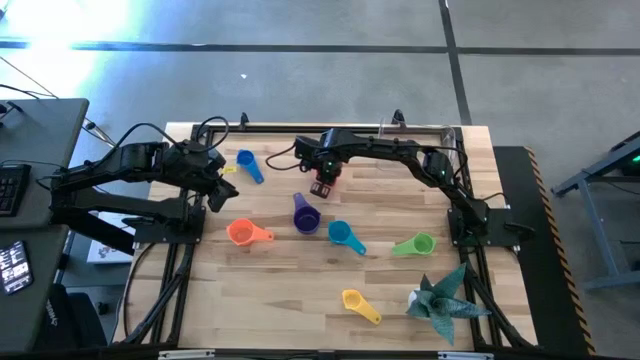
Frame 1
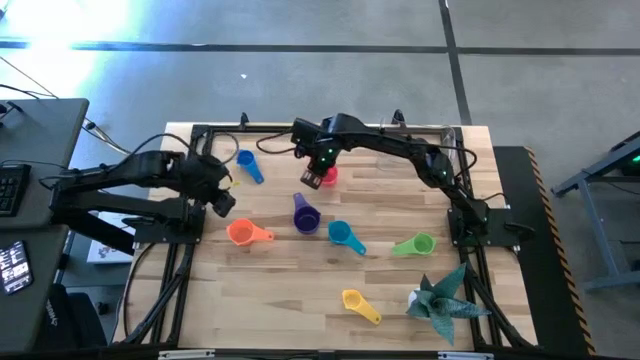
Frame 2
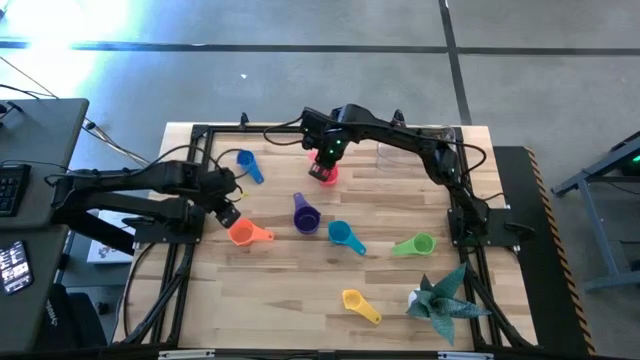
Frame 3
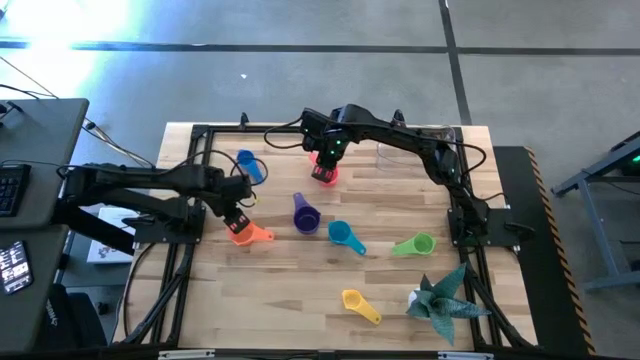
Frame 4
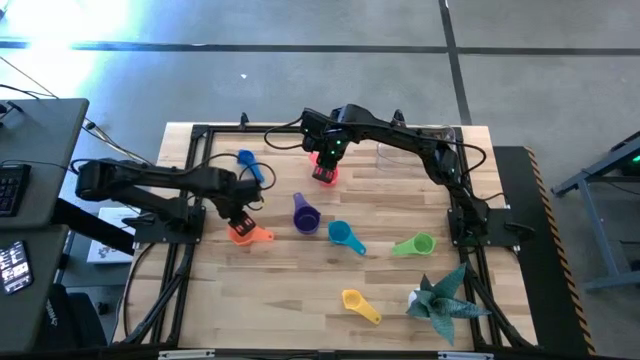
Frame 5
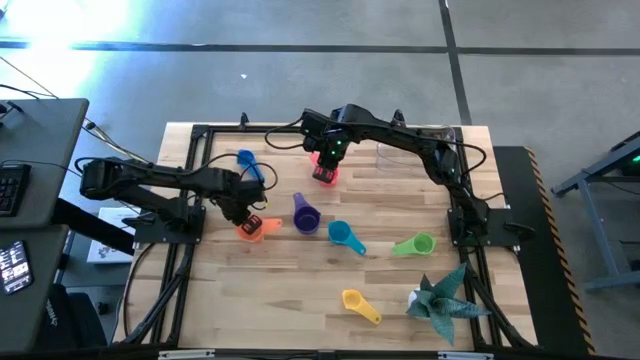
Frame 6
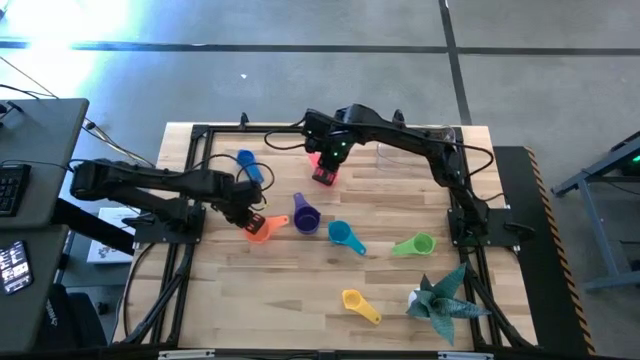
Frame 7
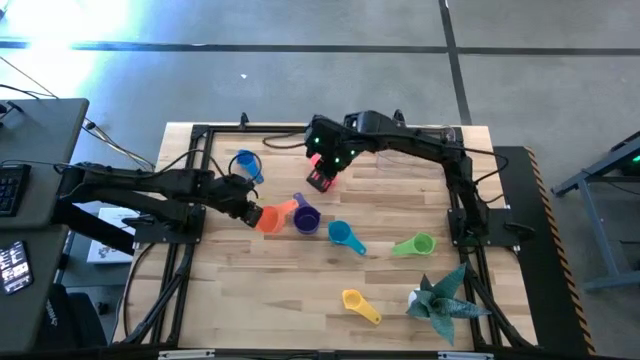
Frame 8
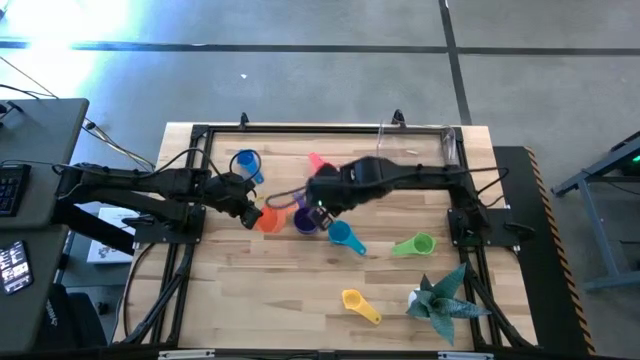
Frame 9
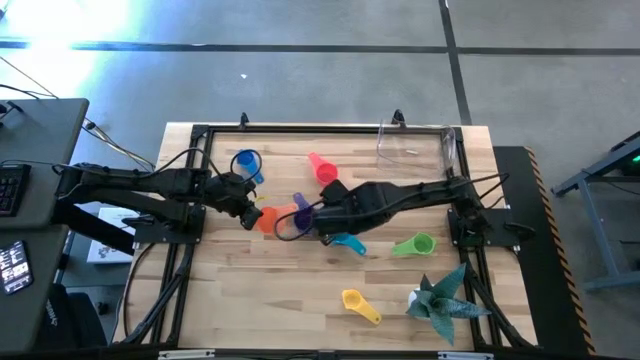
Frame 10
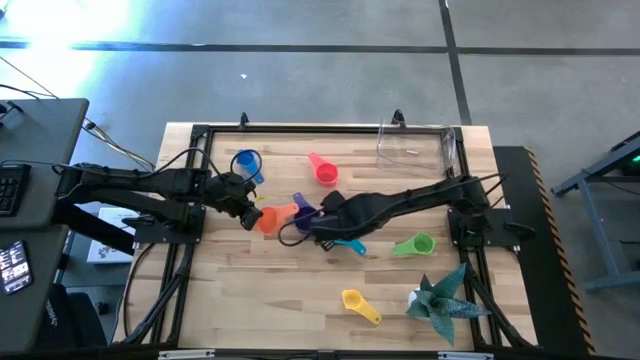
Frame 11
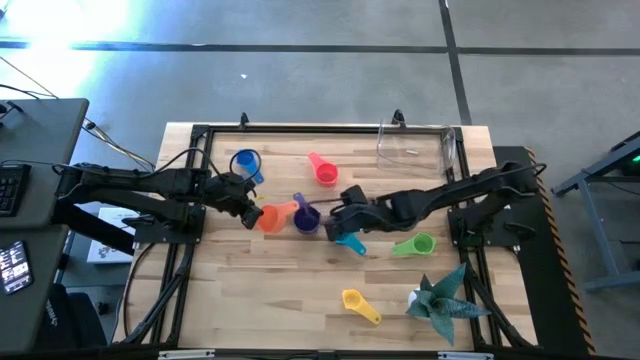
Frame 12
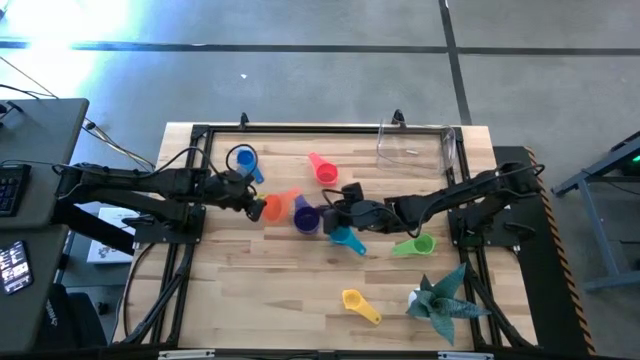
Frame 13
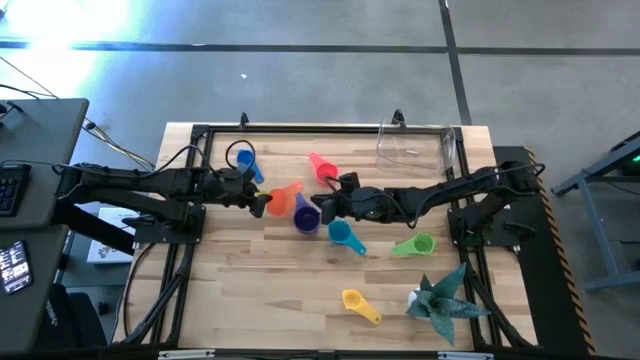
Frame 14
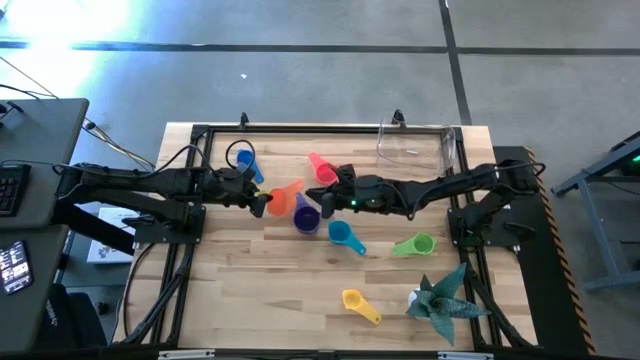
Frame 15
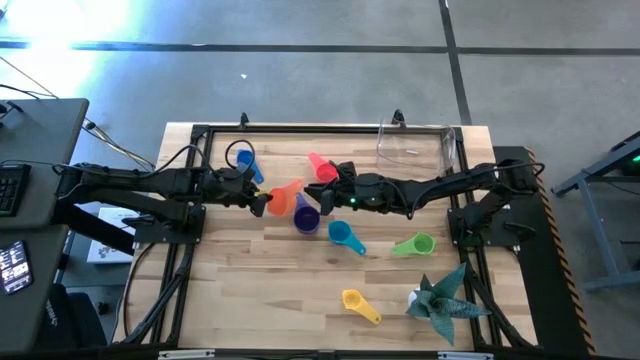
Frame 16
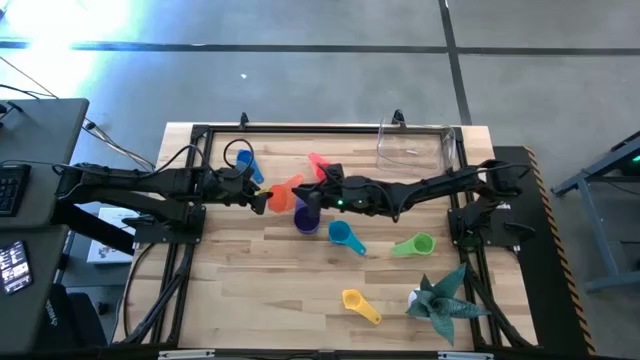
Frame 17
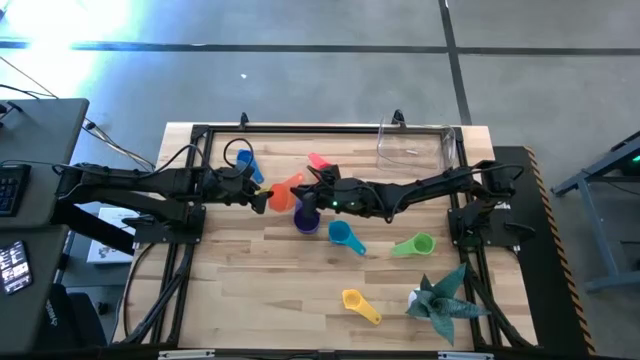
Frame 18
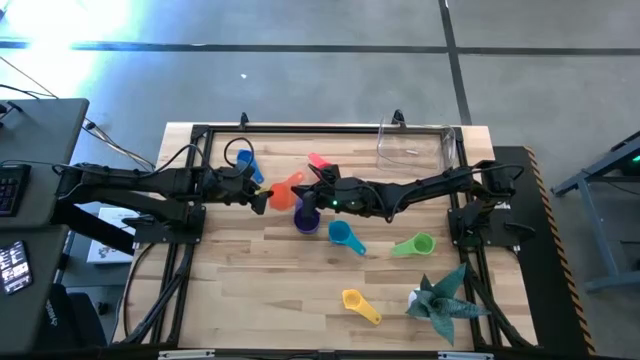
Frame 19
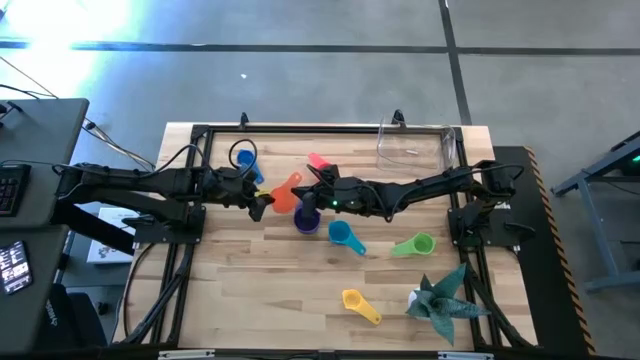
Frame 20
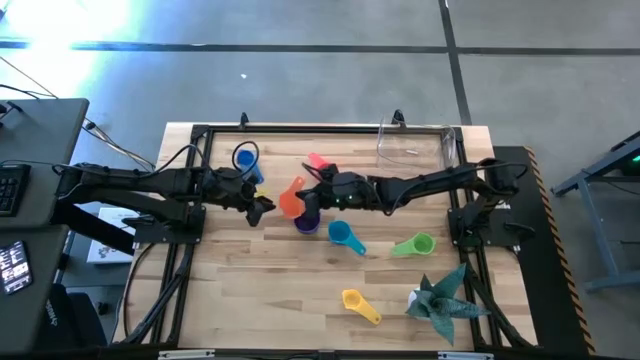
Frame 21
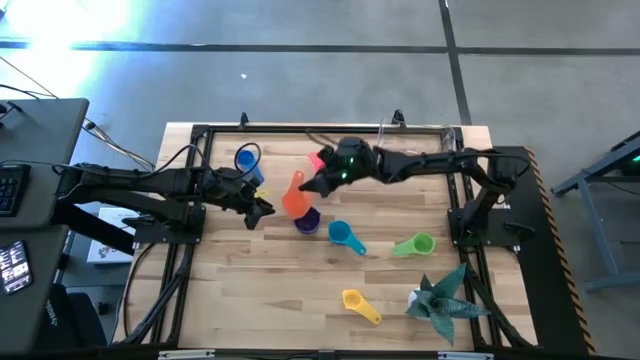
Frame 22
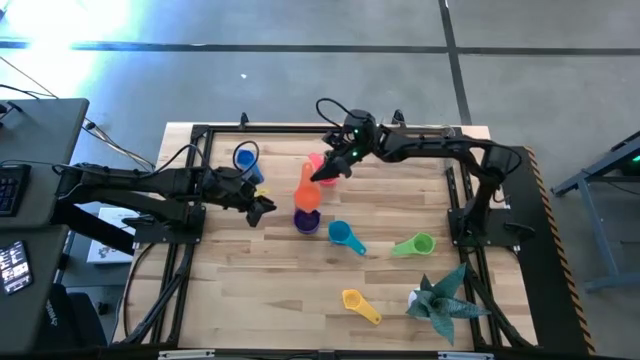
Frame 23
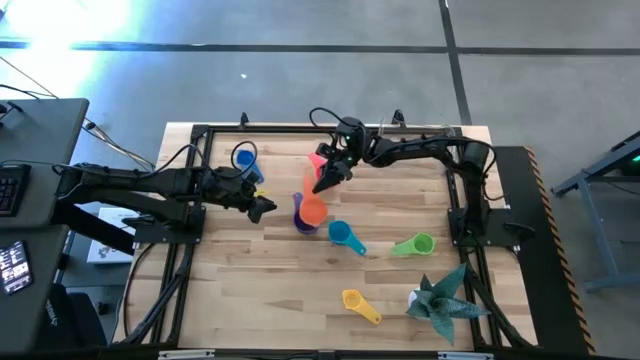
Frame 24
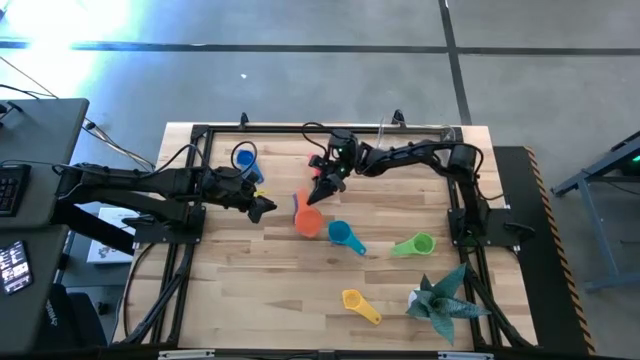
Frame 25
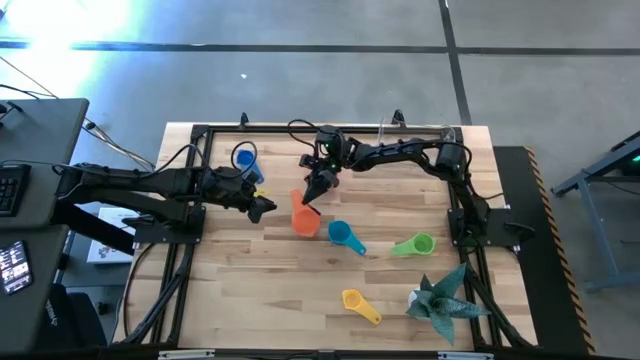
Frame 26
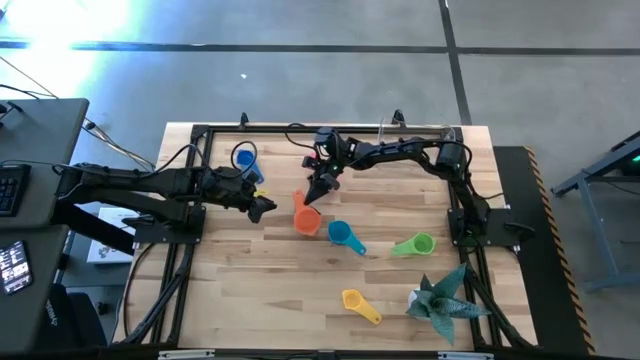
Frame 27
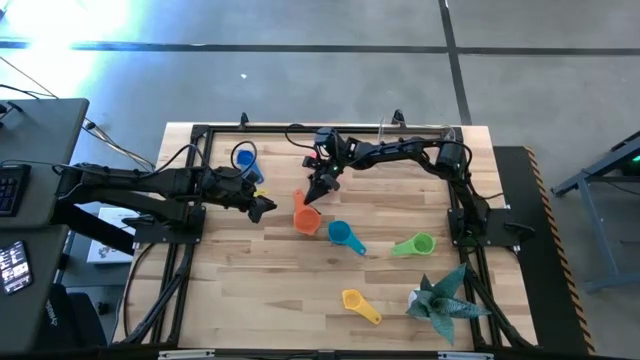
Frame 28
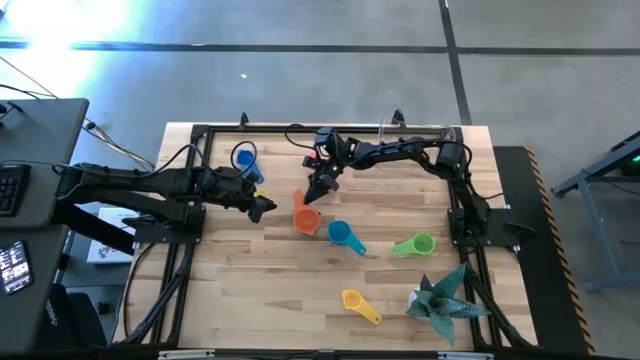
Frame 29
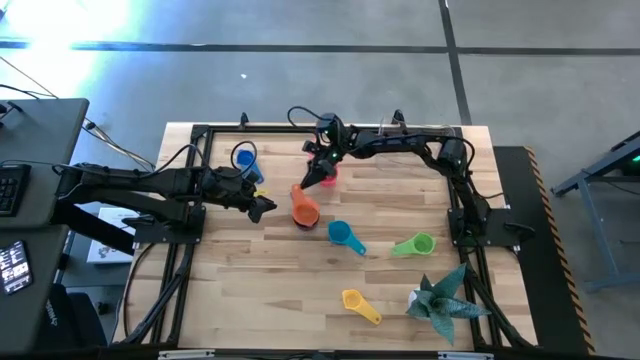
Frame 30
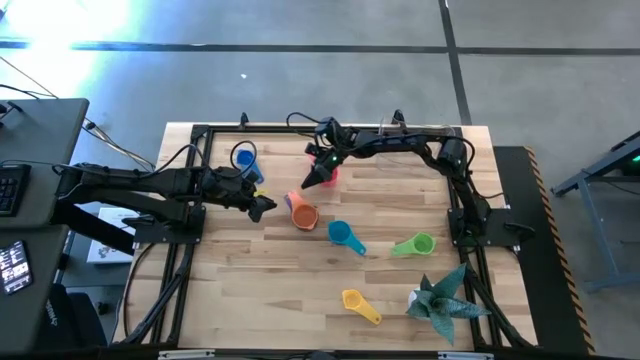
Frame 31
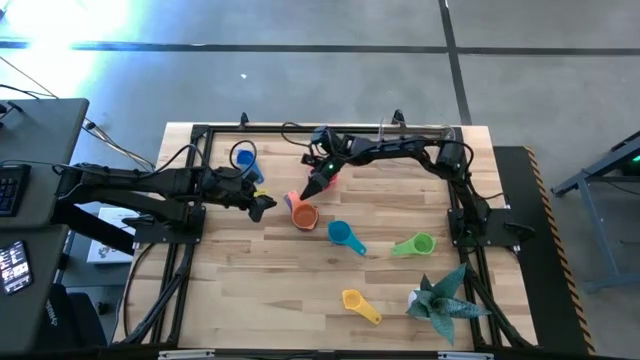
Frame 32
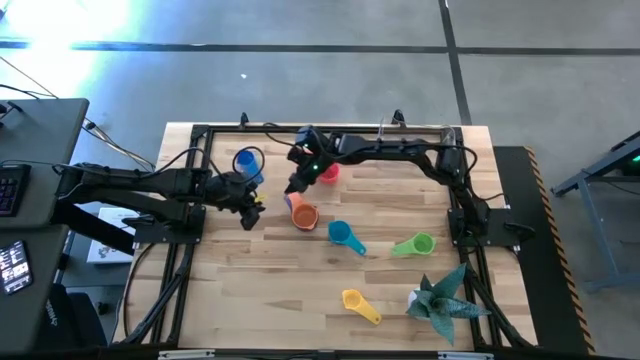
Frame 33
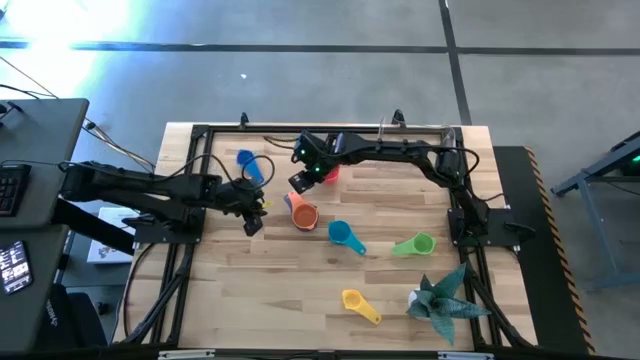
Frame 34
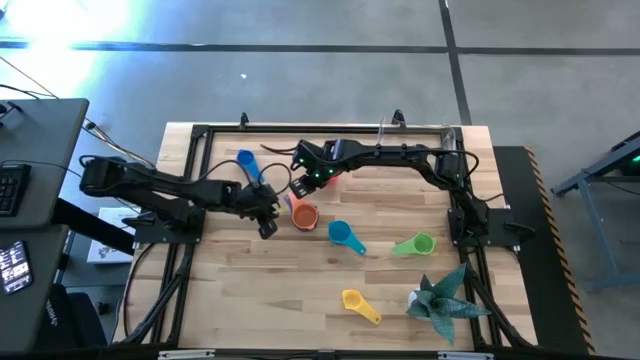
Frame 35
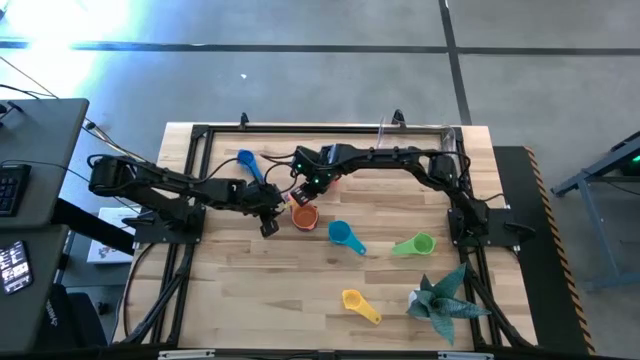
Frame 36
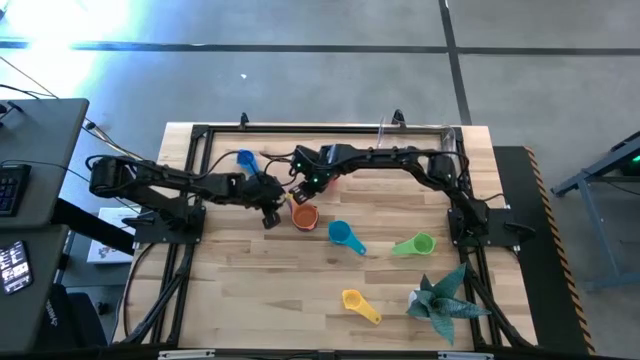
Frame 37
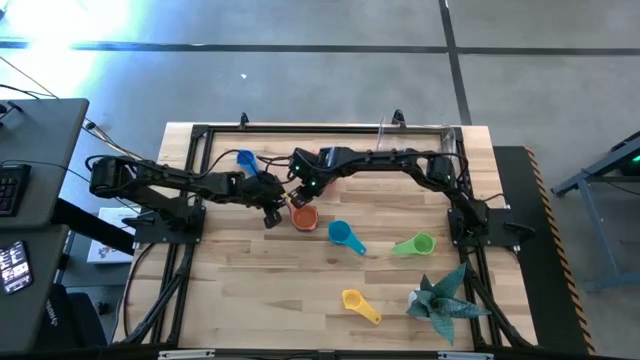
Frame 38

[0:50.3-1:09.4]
Task: Nest measuring cups in basket
Stack the orange measuring cup on top of the purple measuring cup

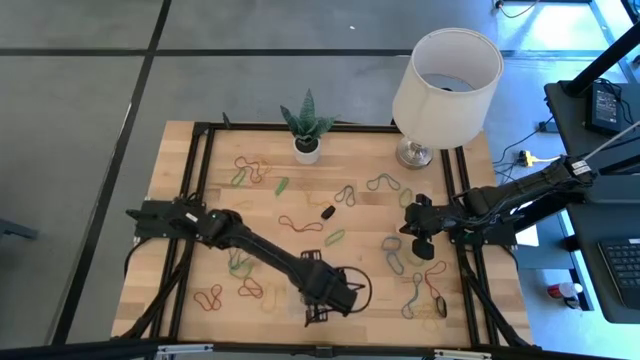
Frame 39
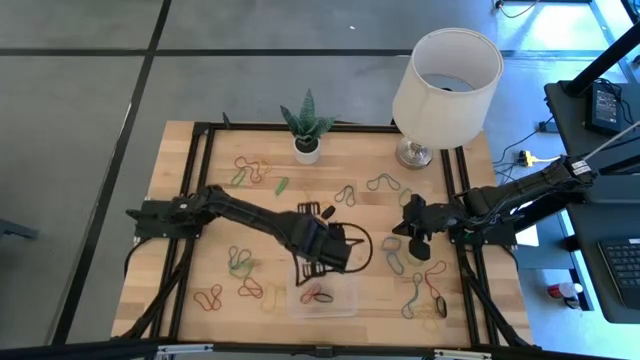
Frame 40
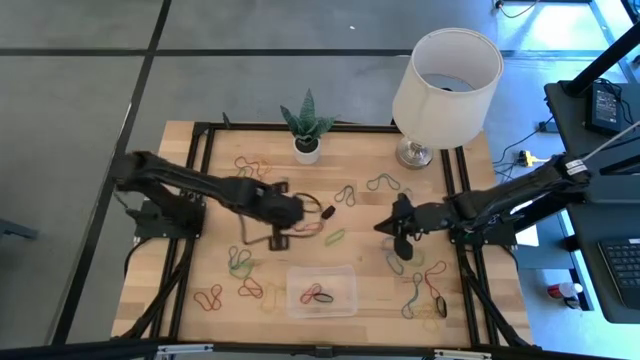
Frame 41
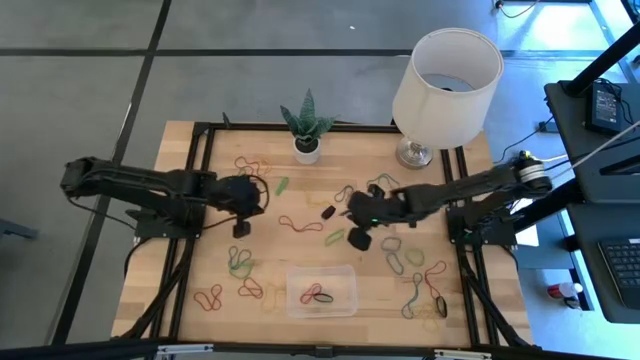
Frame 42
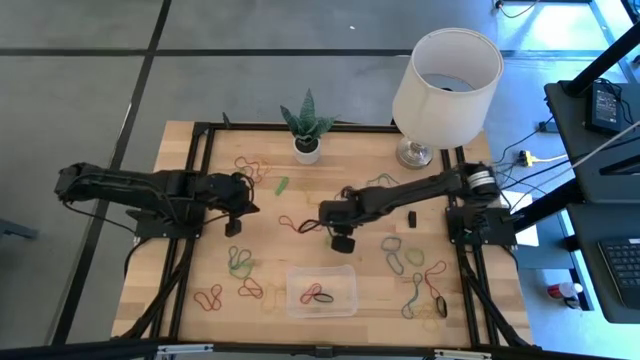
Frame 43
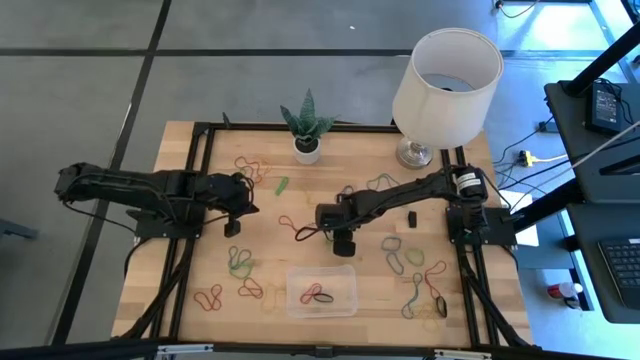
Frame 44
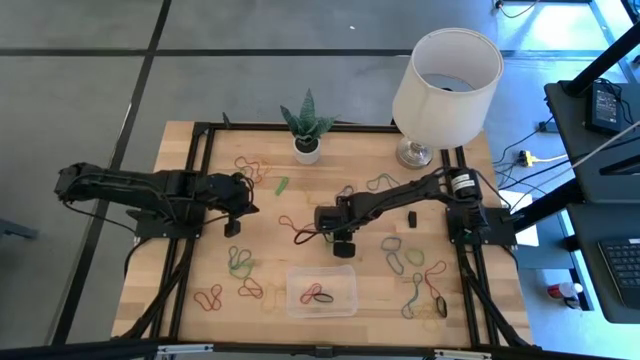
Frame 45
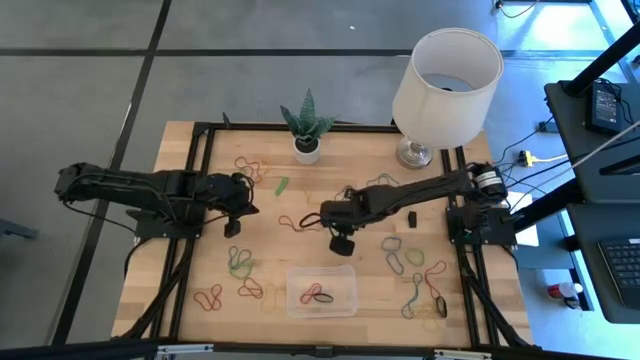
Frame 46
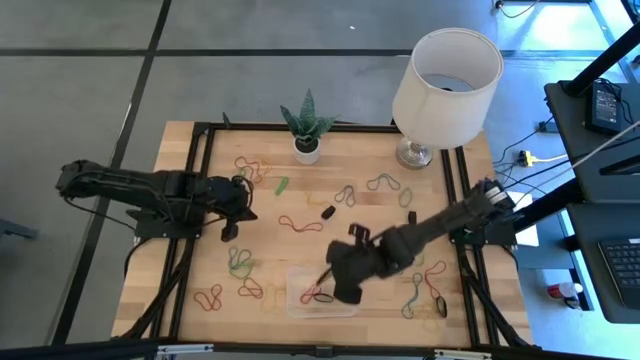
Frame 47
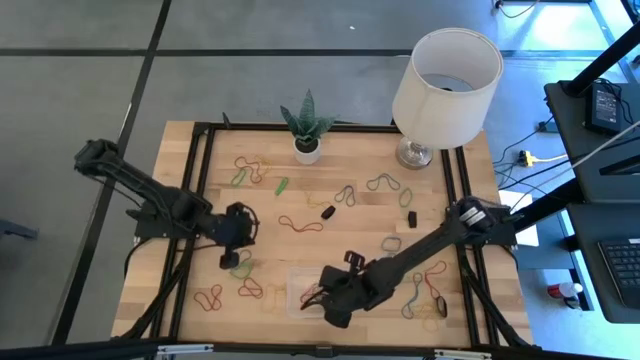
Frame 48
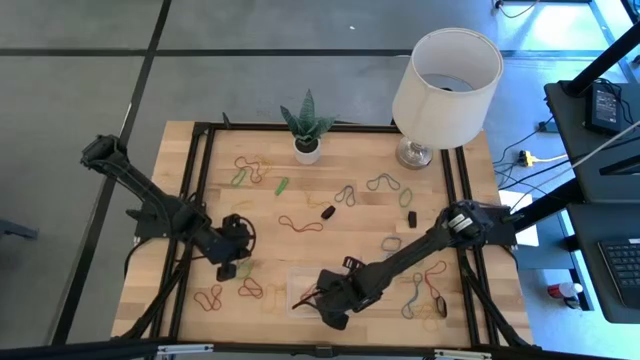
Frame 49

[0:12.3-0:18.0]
Task: Pick and place rubber bands into bin
Put the green rubber band into the transparent bin
